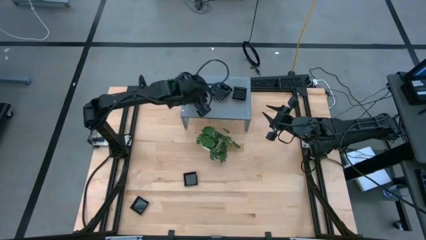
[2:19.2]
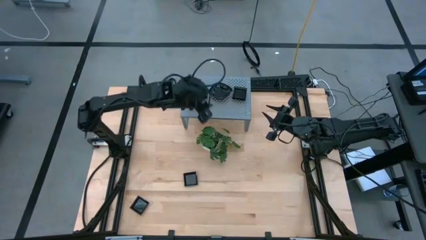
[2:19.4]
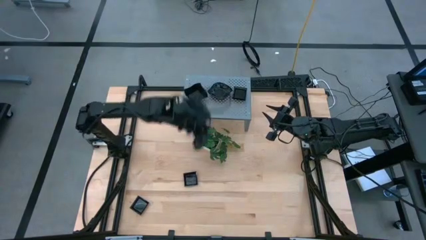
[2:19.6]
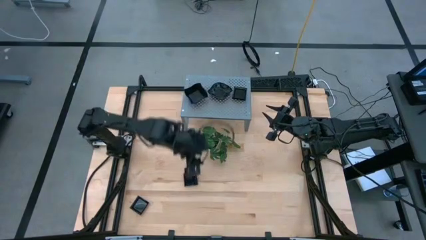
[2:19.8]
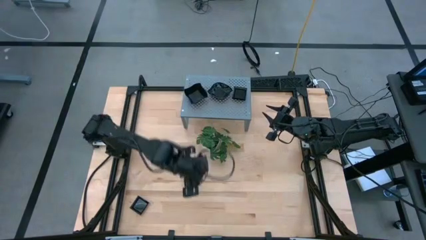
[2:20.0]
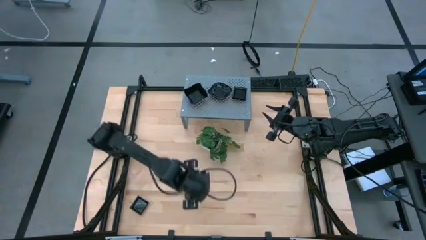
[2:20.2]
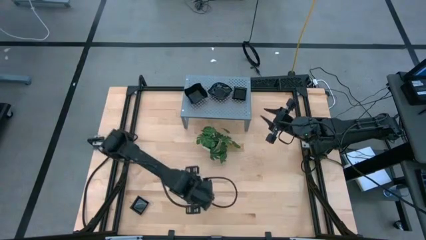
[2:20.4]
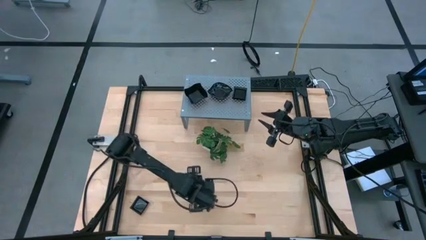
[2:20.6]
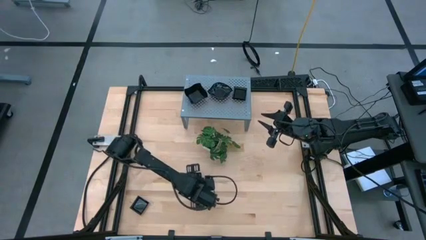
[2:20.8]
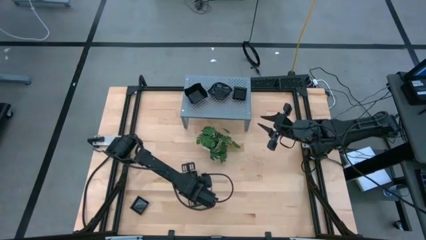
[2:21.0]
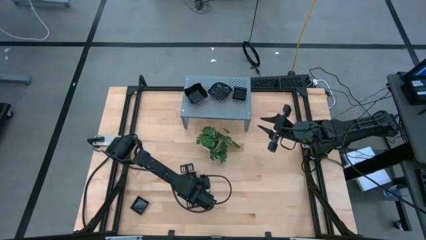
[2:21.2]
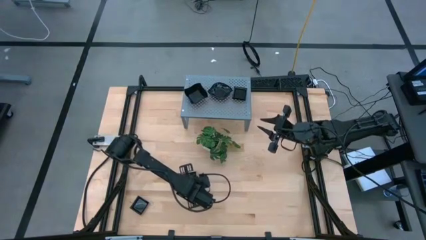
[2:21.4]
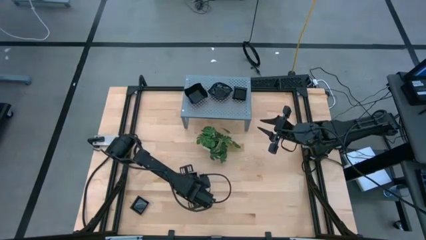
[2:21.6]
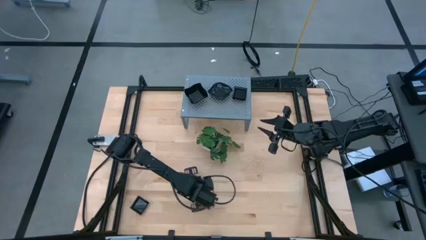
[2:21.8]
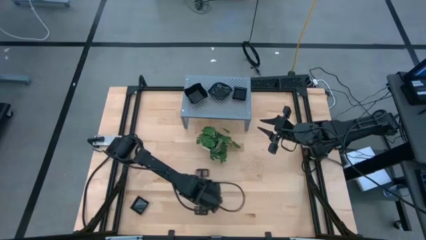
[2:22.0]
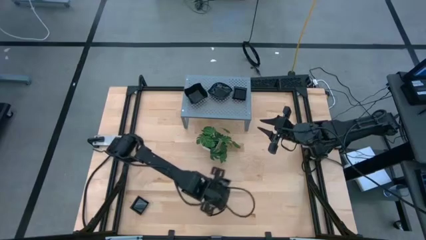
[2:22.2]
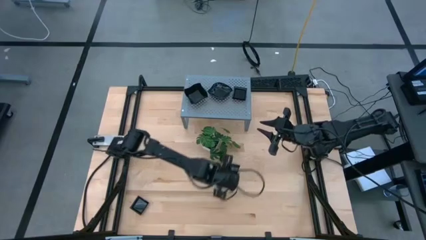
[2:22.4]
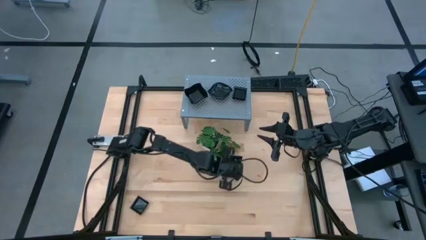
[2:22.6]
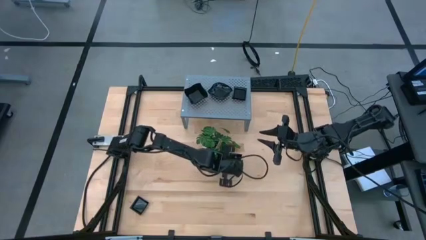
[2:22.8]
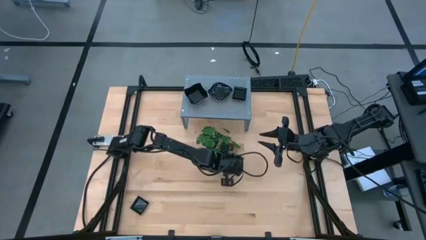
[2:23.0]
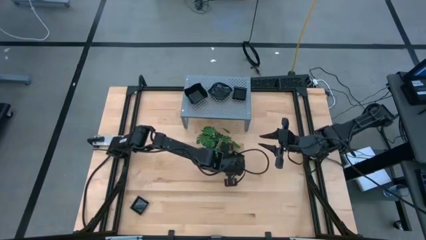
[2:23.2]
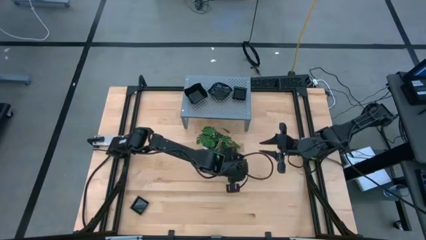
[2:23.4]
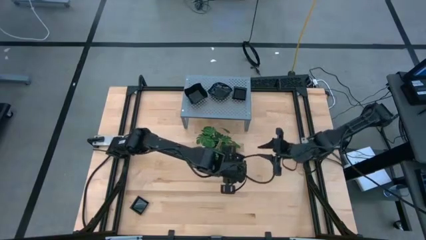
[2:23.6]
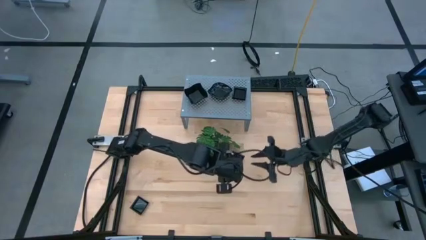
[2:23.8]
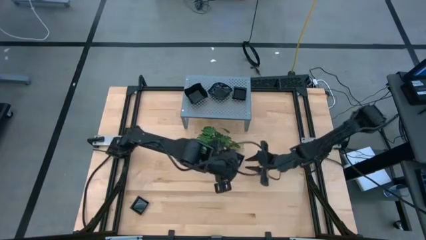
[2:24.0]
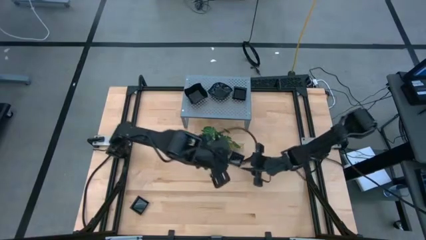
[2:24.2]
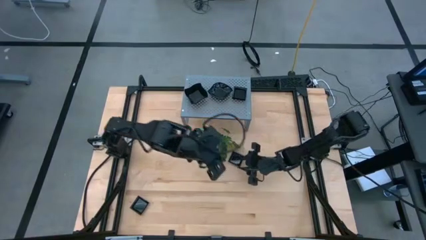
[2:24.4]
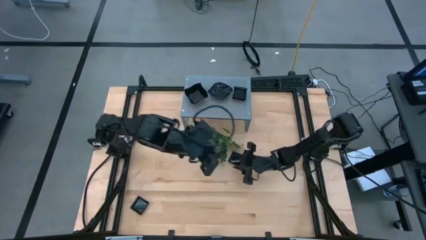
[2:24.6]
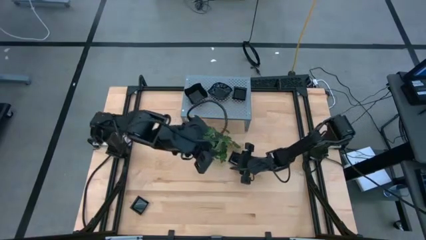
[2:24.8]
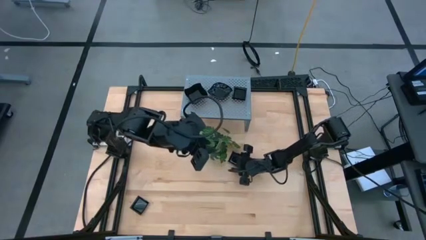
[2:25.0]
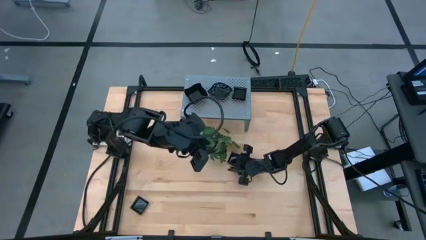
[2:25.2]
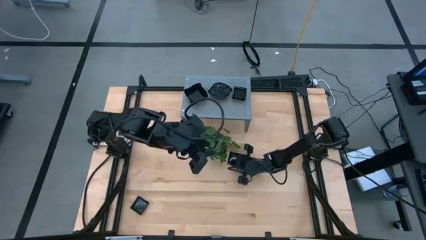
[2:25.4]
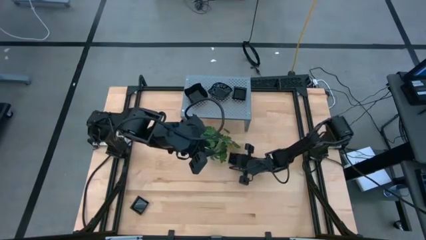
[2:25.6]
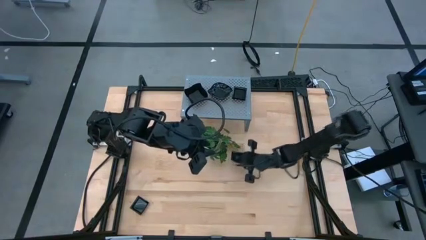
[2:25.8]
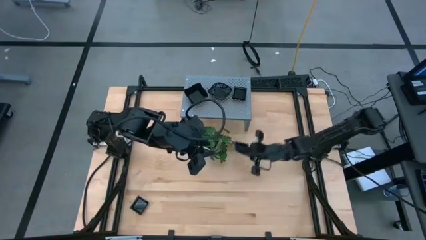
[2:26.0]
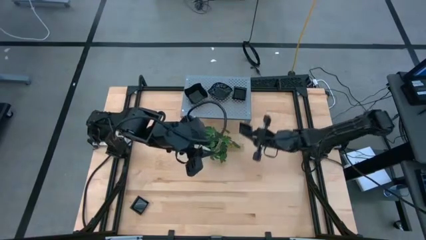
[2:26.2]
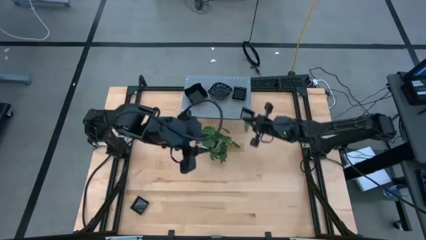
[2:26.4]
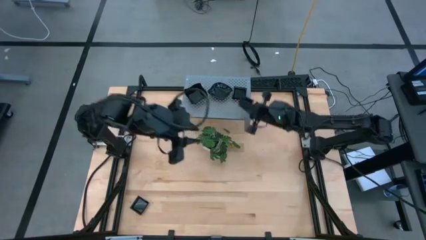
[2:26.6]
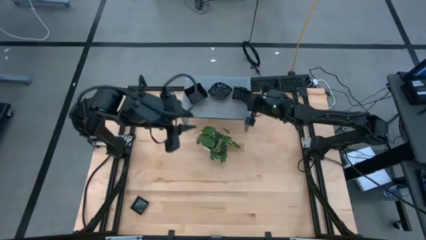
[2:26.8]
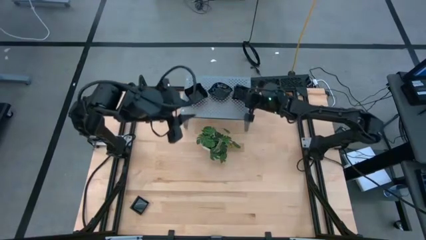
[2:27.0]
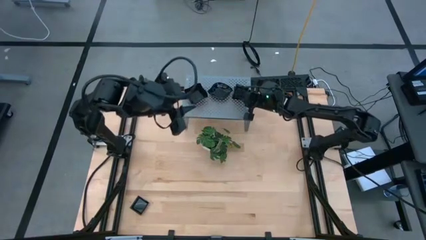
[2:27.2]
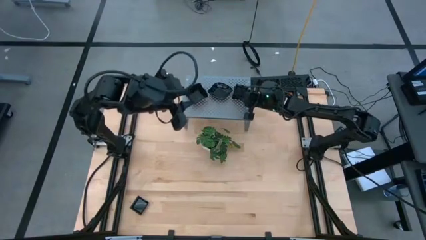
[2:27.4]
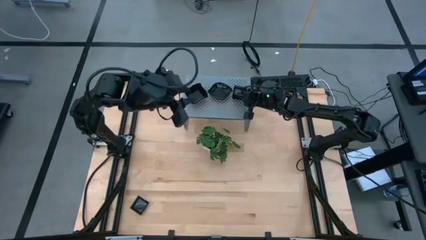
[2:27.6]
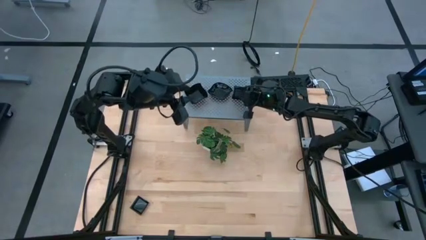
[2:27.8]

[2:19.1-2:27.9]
Task: Pick & Place Mini shaped plates
Stack the square plate on top of the stacked square plates on the shelf

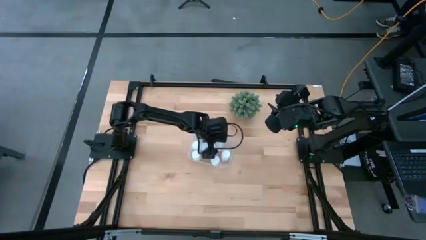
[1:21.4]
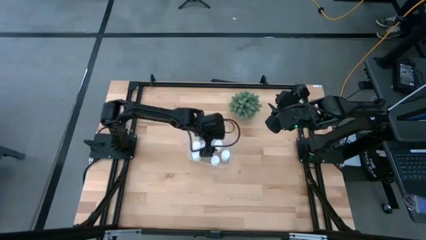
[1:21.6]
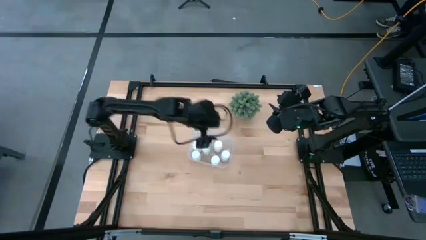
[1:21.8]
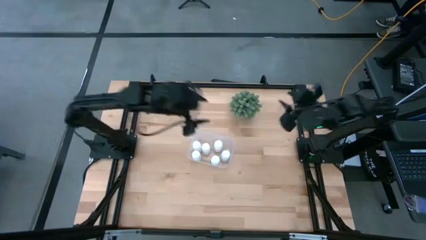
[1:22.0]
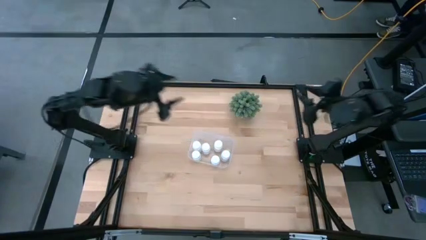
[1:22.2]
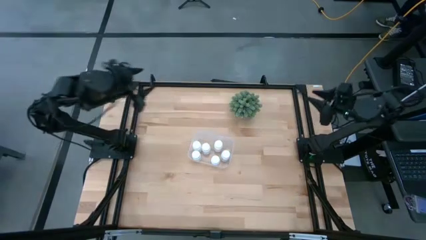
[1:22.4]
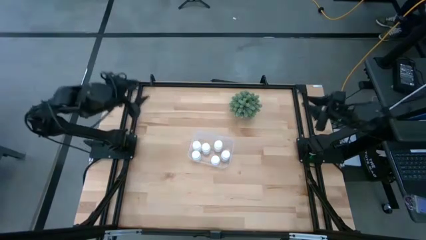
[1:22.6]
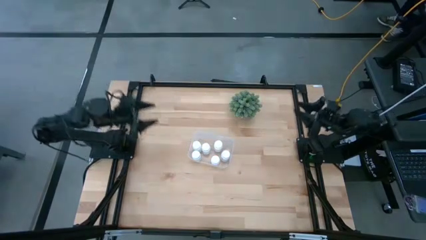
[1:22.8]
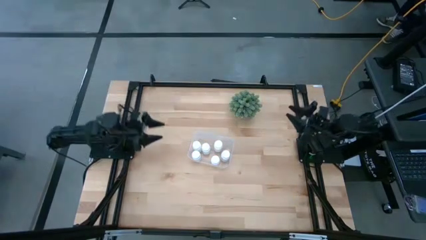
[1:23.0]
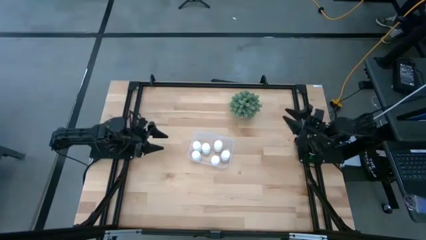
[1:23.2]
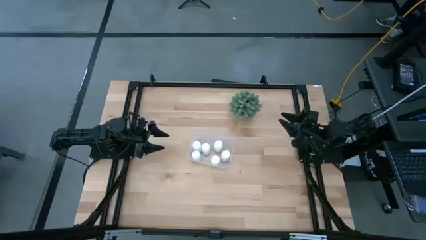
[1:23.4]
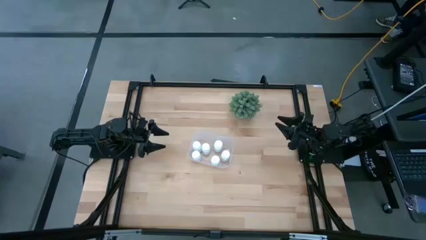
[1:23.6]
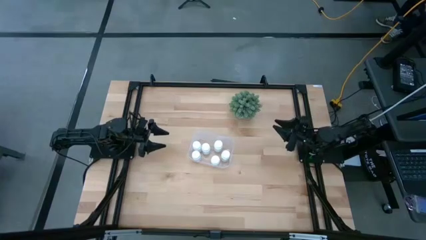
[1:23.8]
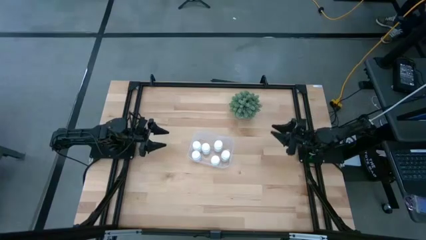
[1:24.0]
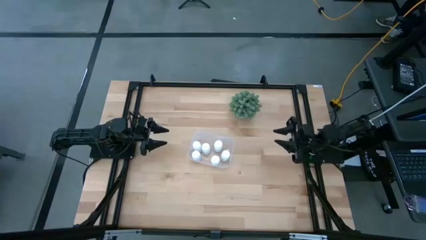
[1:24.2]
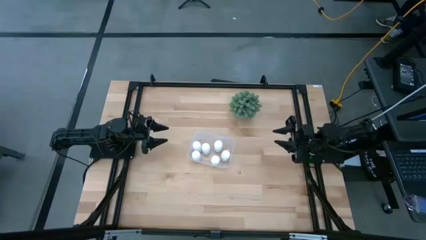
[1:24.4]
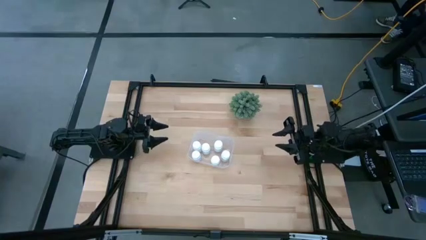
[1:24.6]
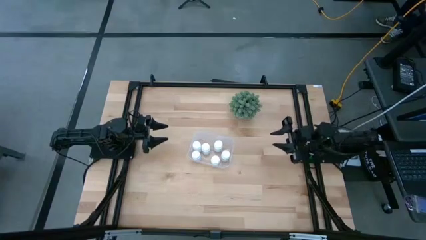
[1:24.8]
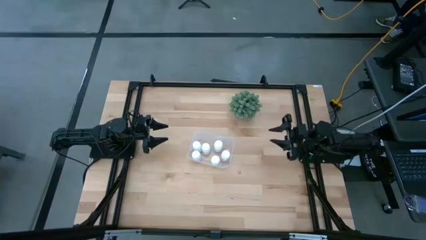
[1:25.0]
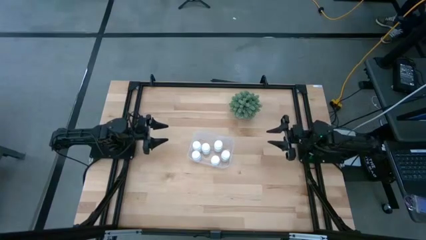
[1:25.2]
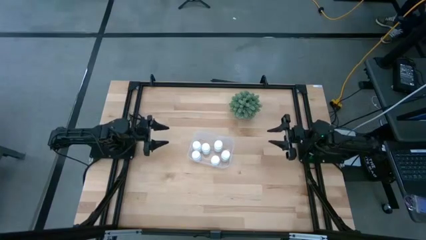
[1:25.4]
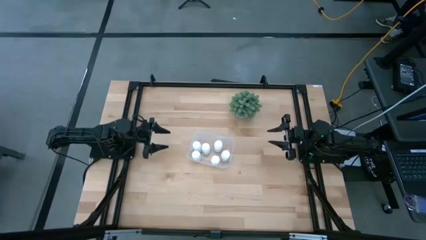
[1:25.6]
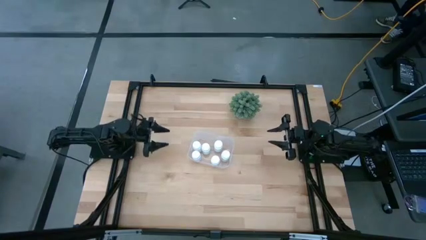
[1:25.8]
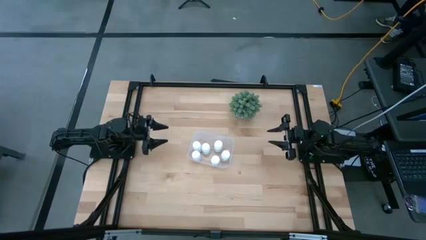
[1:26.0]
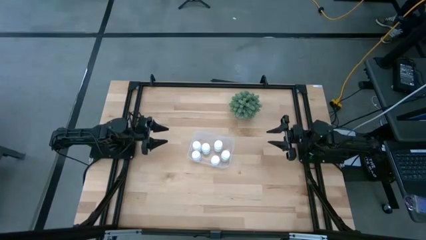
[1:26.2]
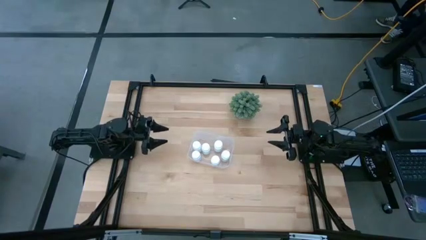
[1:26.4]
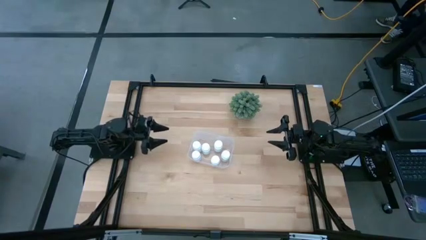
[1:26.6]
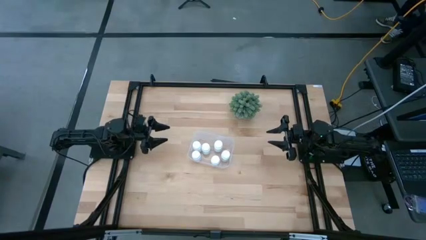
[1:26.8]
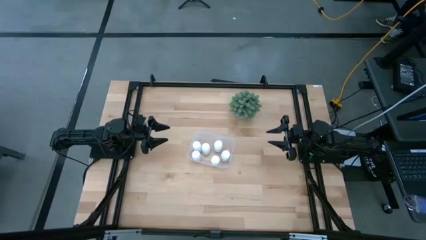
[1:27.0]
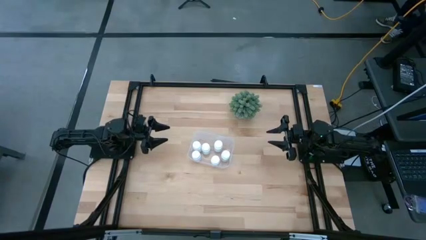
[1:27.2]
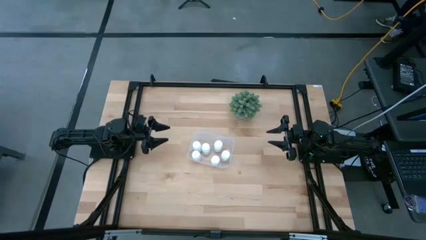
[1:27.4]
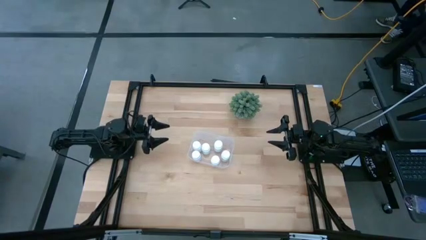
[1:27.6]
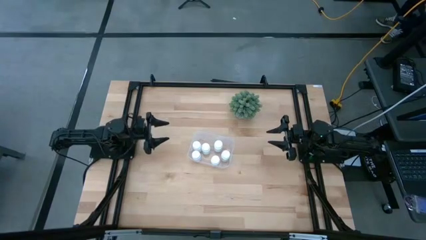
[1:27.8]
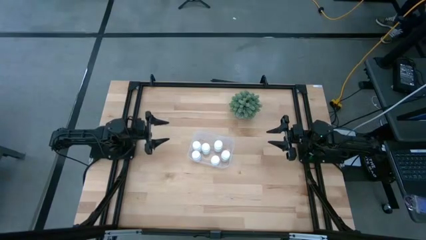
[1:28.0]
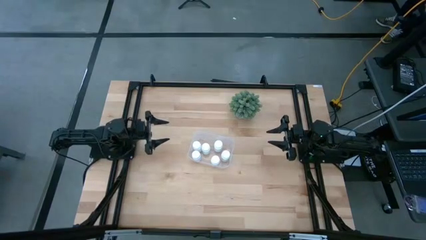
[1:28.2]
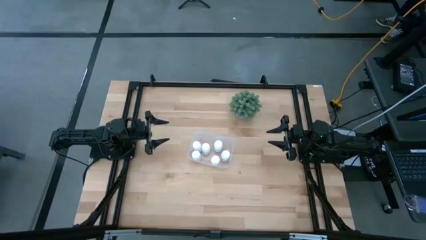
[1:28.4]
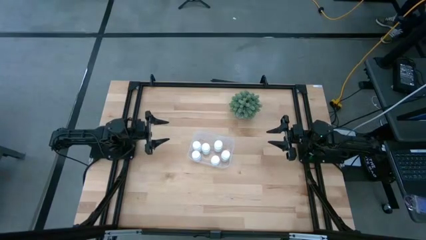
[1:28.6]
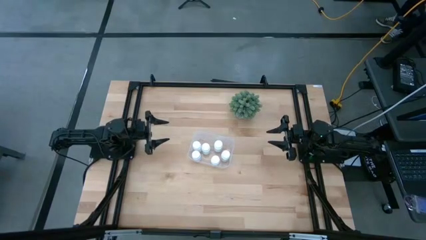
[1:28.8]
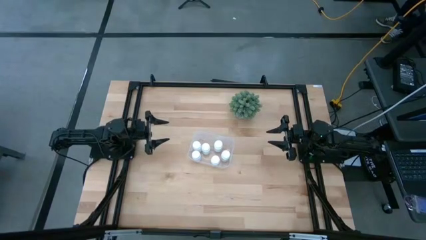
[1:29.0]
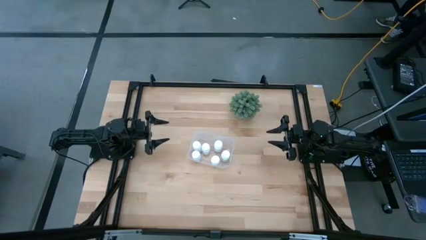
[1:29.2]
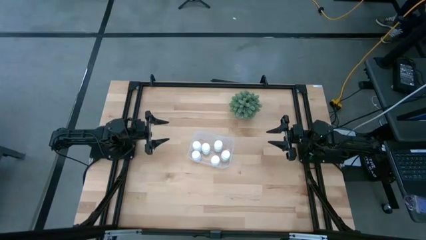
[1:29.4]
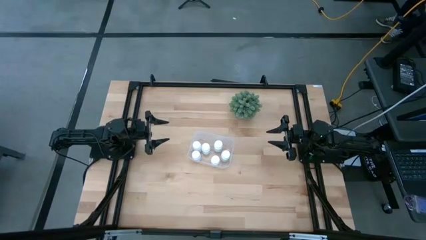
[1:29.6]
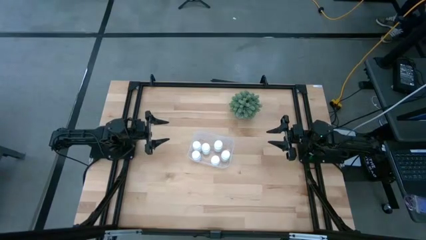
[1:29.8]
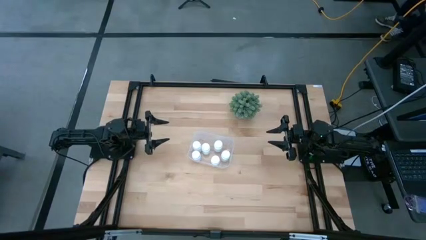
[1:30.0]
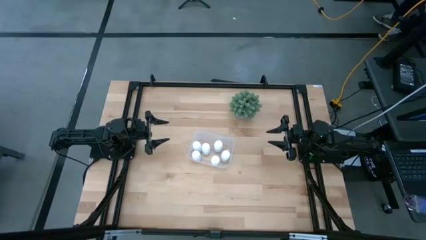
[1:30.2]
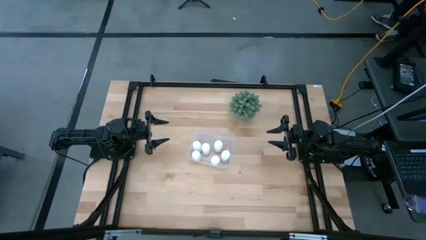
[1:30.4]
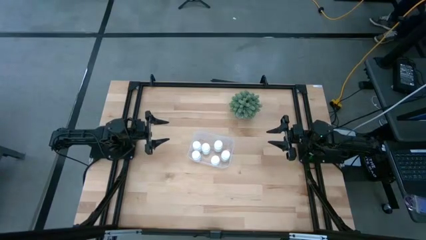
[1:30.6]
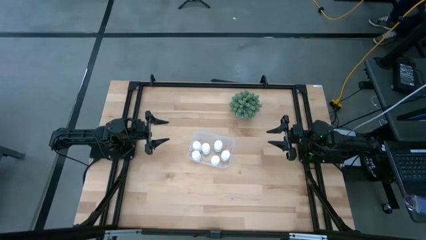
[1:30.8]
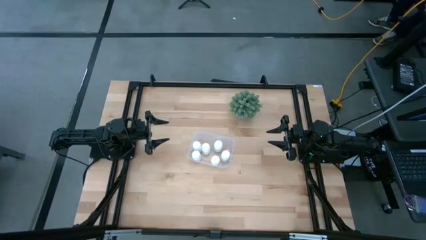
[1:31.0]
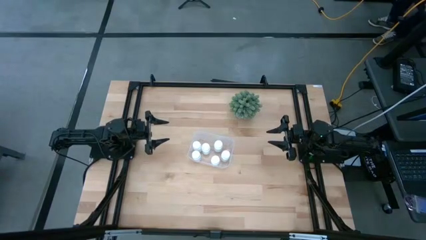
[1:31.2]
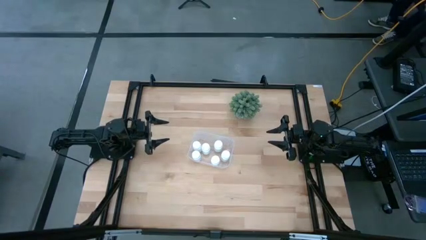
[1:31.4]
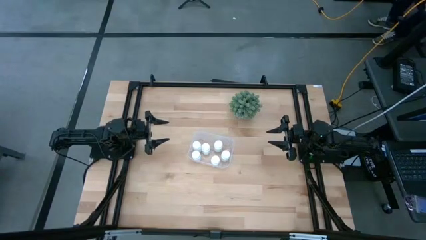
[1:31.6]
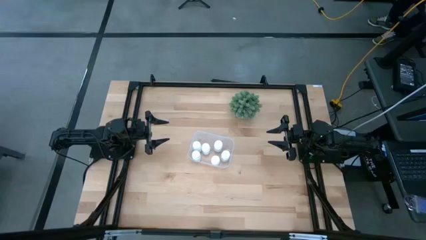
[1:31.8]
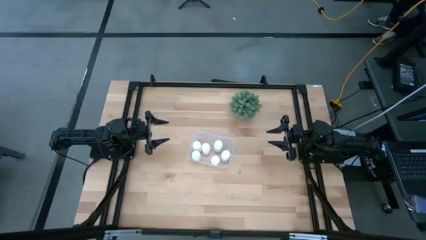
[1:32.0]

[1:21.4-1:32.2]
Task: Pick and place pill bottles into a basket
Return to Home Position
